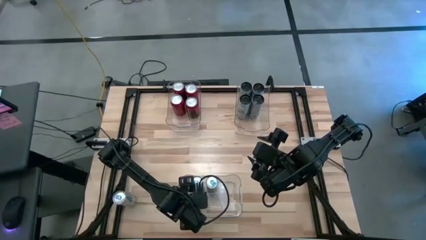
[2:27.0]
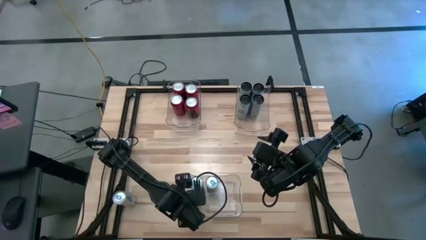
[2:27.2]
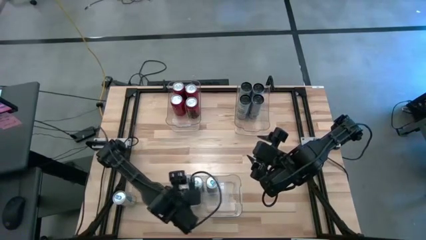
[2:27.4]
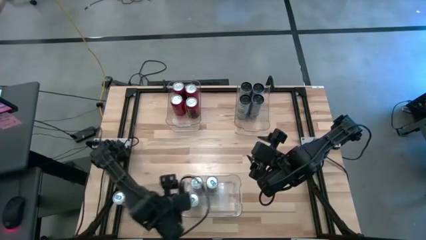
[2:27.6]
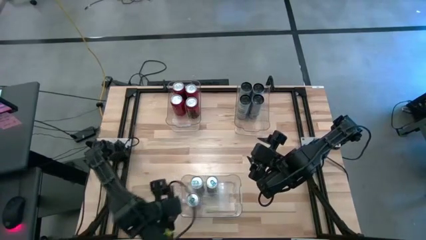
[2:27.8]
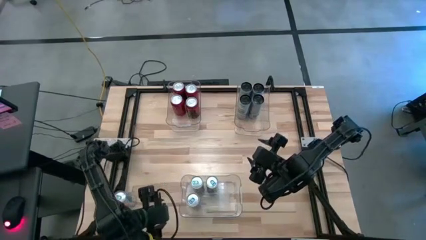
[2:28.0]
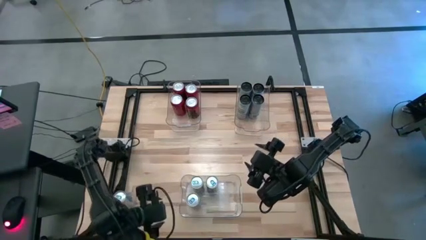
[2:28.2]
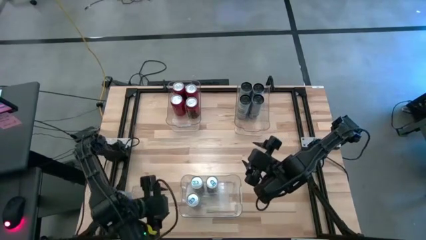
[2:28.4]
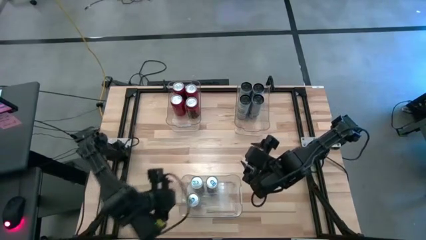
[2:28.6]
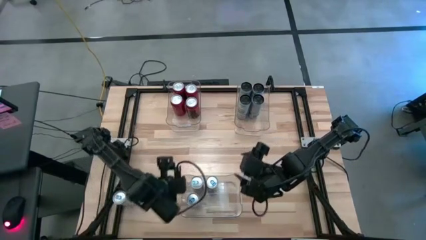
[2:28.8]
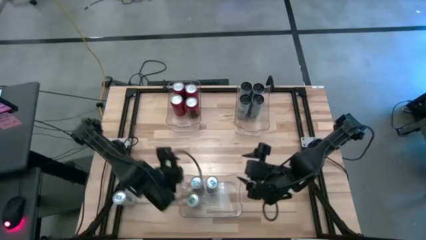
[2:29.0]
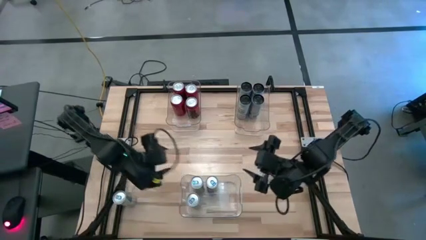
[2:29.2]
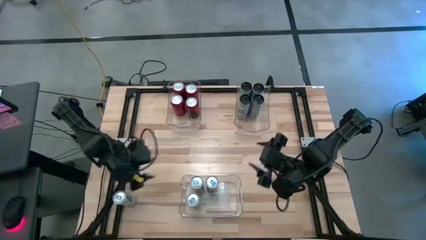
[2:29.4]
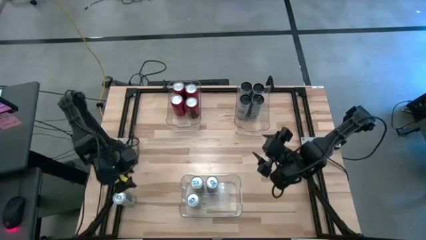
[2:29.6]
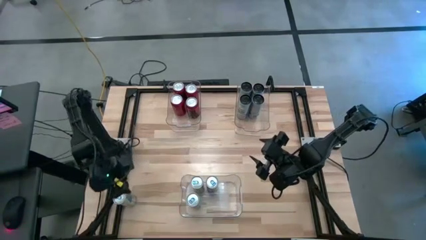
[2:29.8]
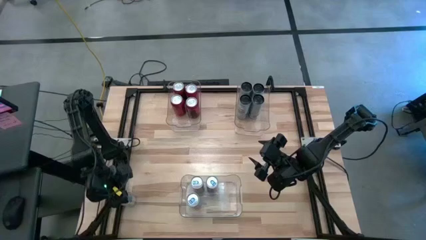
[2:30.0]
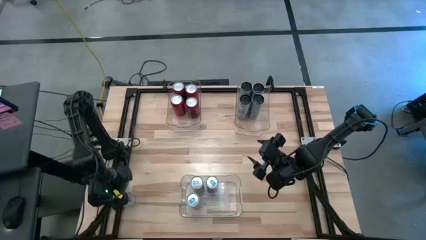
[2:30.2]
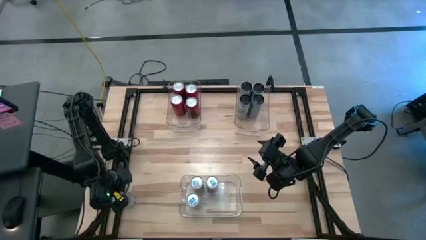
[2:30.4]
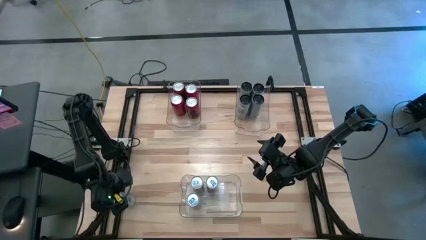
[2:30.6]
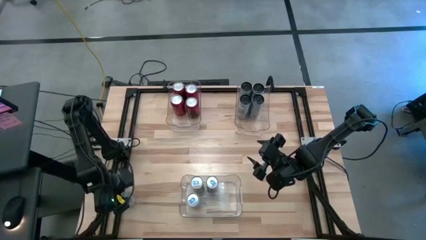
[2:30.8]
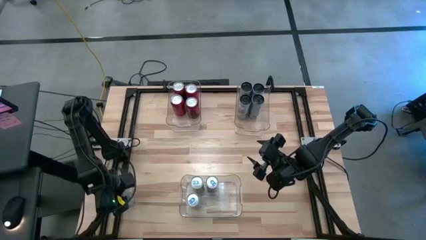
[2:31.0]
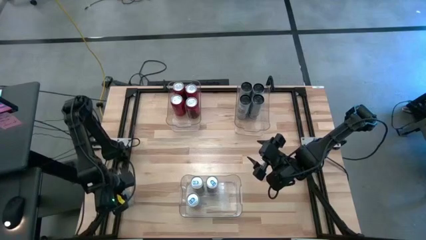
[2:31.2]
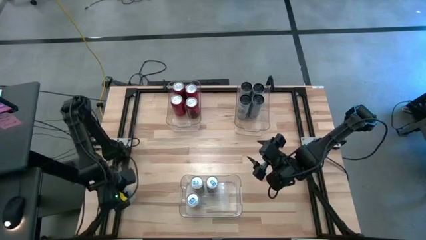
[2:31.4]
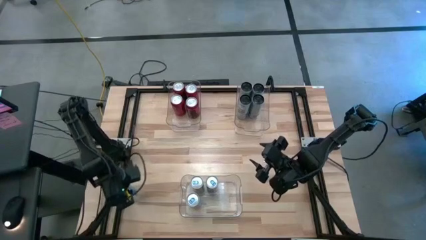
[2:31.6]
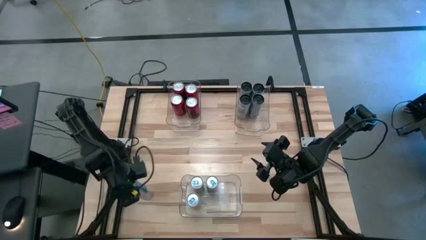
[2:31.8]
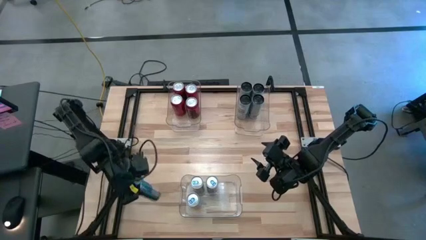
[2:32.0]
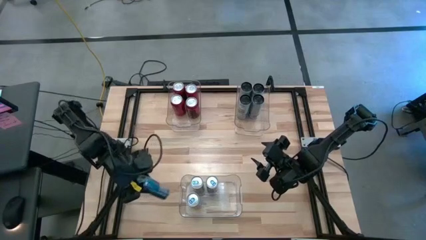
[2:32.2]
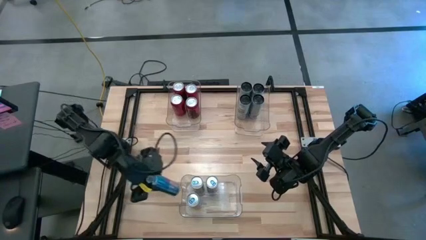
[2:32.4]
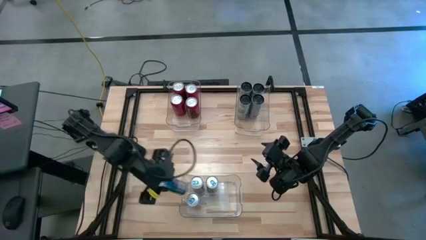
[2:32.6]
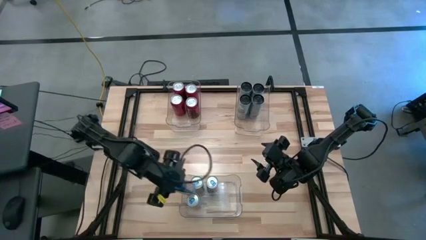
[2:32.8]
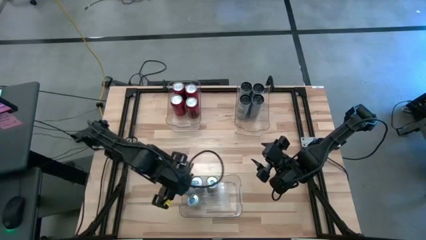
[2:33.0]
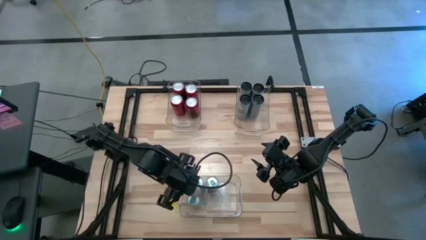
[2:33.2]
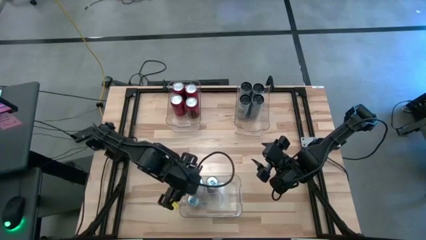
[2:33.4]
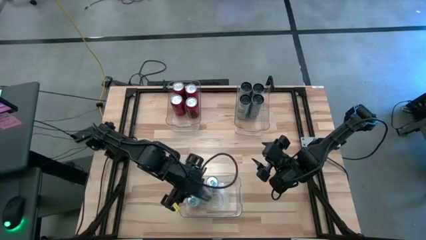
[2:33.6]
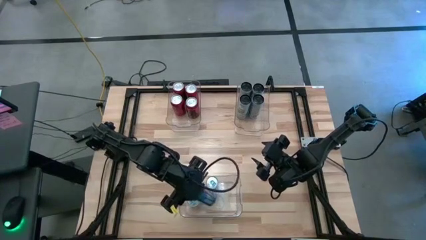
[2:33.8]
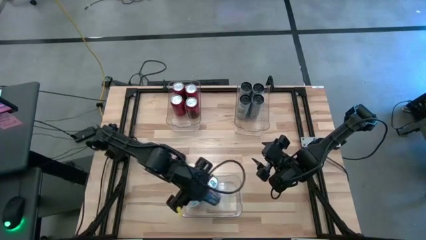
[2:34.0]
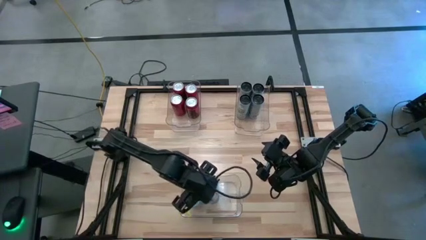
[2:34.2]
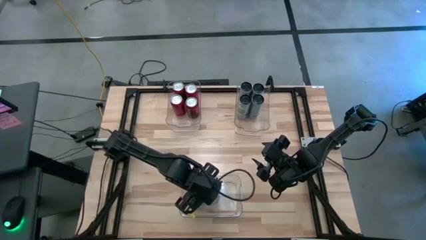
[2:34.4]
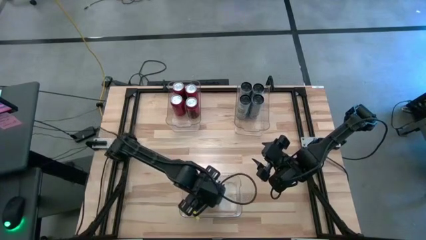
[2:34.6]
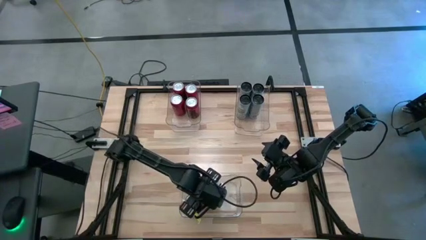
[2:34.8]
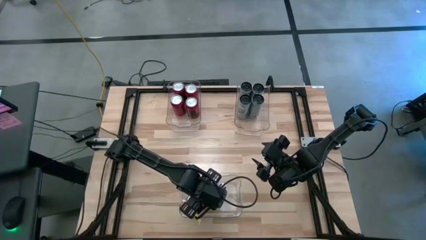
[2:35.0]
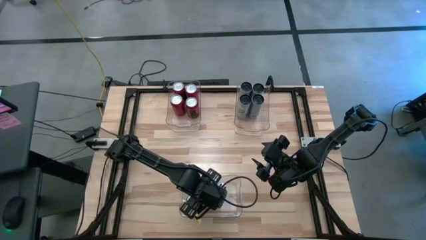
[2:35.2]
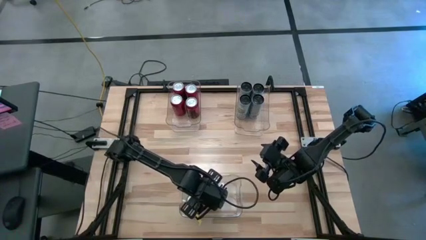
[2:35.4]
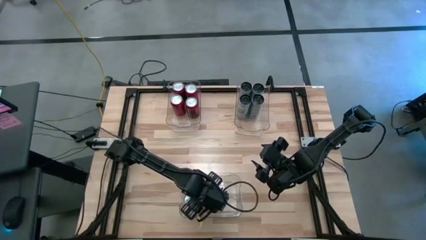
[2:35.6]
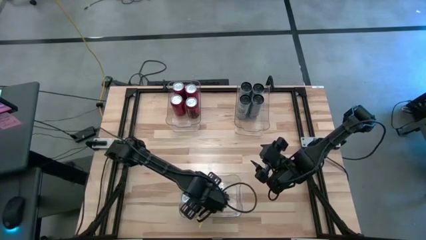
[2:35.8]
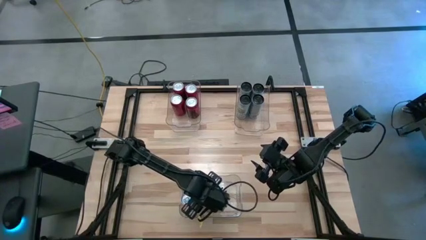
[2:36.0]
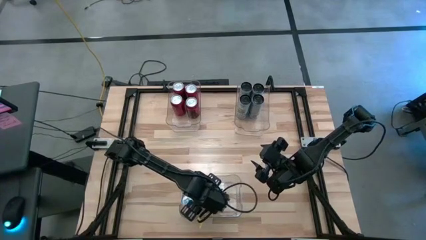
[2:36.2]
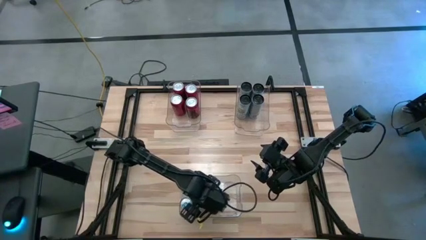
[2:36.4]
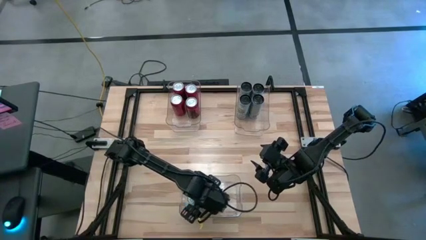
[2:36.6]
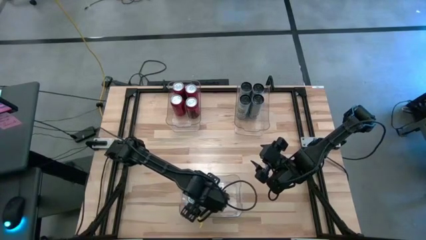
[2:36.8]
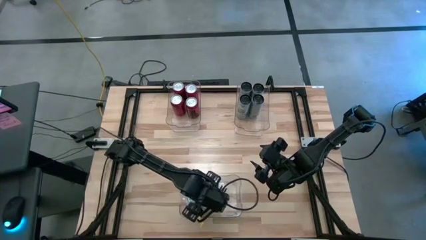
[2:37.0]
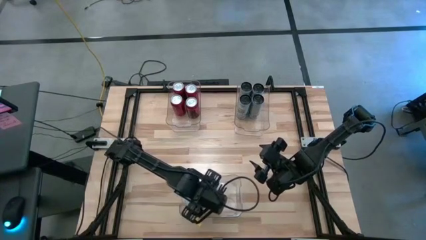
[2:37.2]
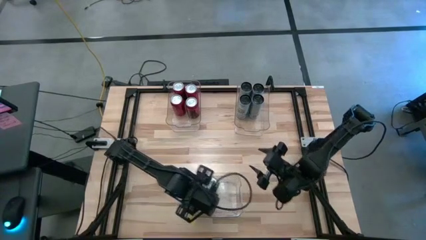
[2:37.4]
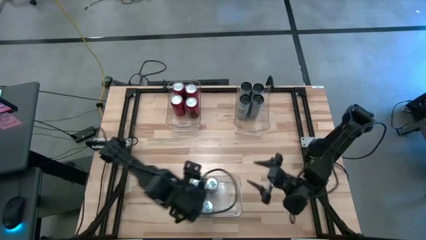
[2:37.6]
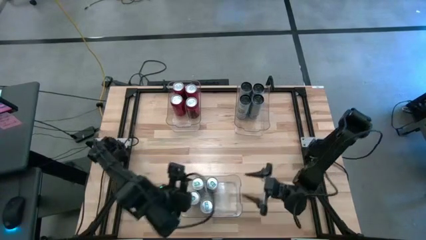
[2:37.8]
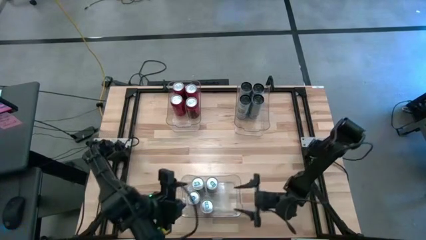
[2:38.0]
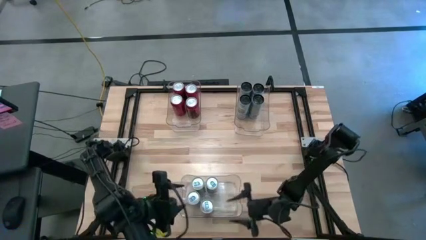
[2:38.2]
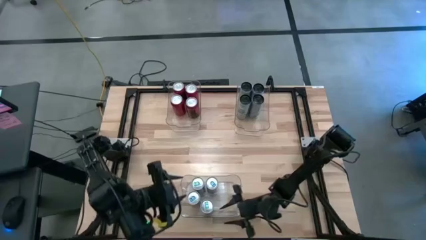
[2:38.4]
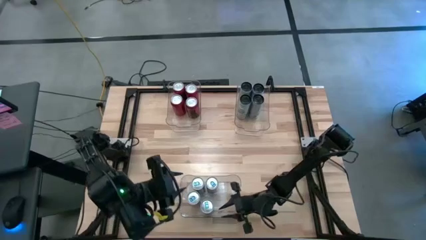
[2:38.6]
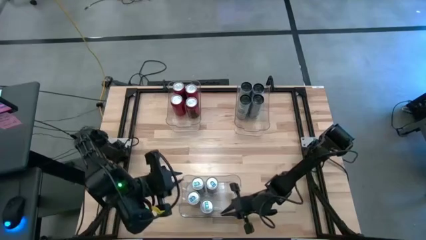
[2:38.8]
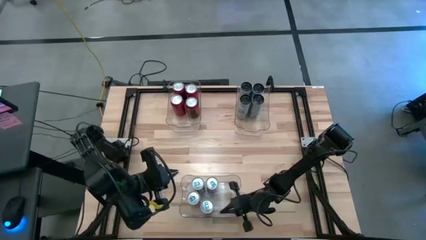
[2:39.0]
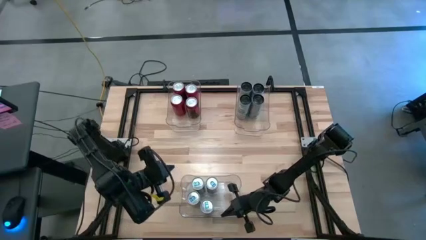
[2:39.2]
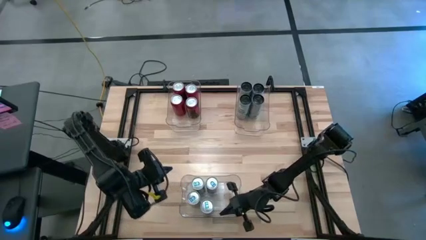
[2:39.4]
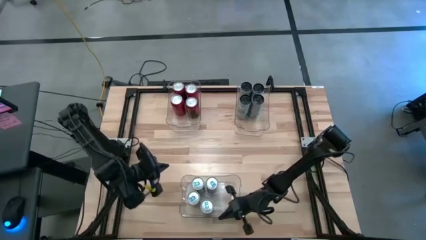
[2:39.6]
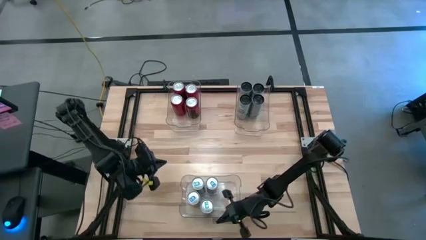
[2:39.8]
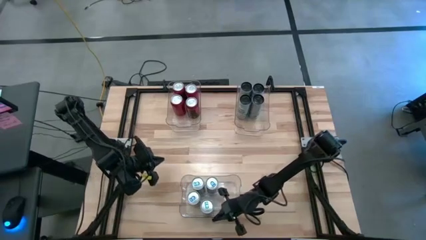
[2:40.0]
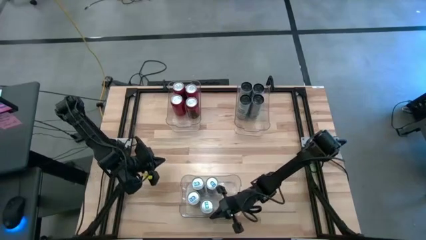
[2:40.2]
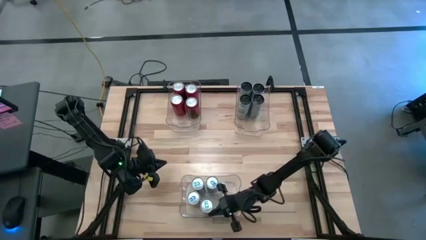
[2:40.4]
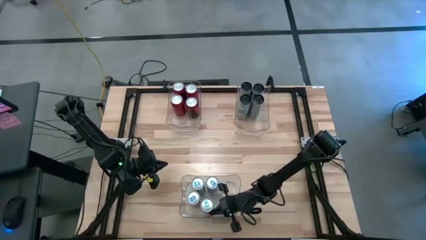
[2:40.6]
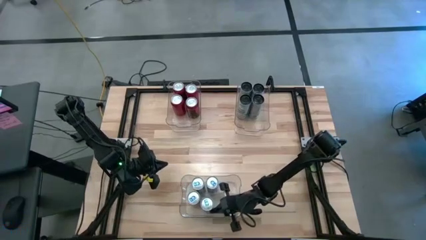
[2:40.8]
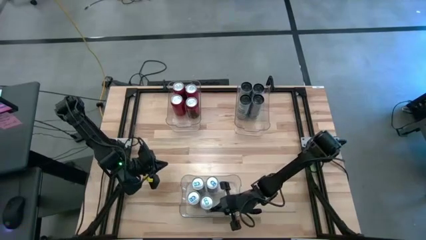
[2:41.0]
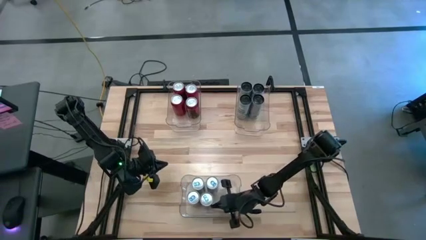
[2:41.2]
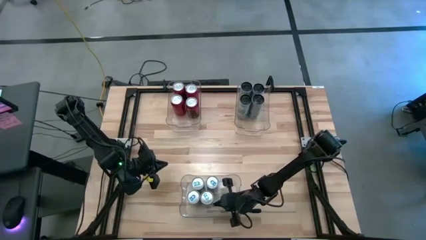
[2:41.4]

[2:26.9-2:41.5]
Task: Sort soda cans
Put the blue soda can into the bottom center transparent bin
